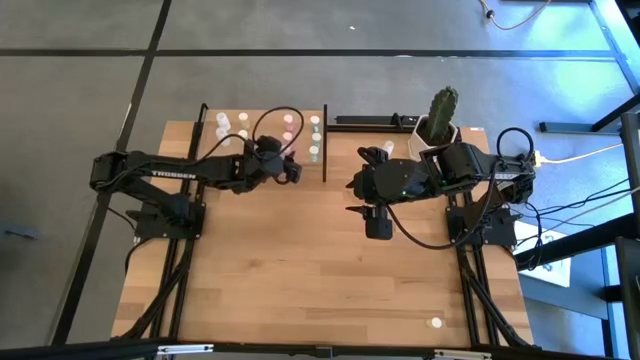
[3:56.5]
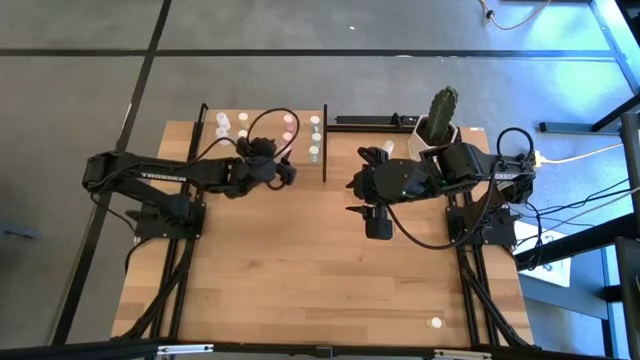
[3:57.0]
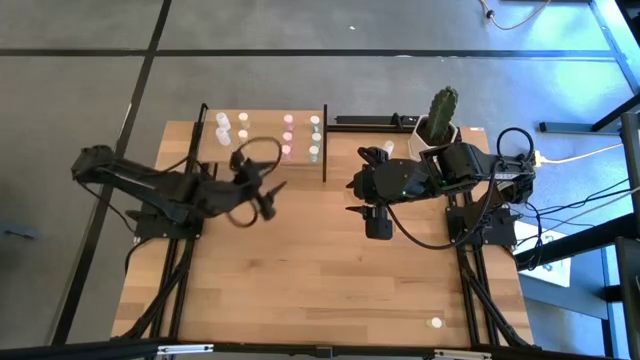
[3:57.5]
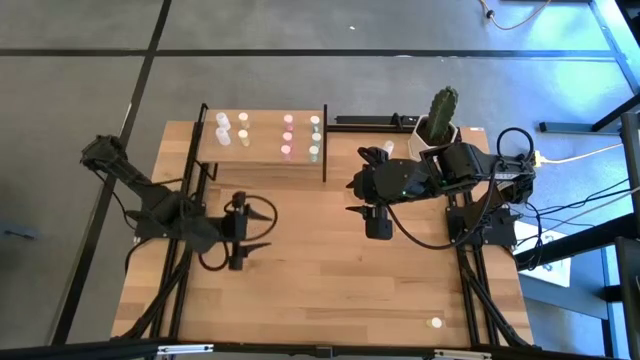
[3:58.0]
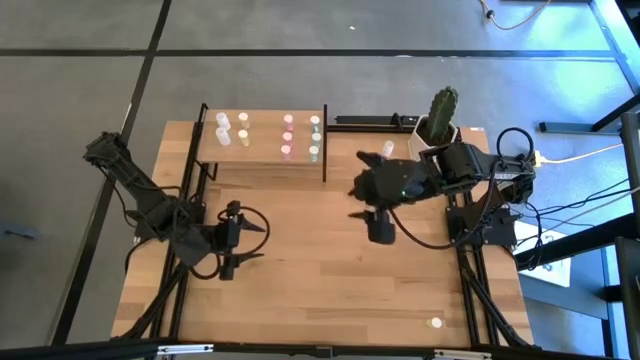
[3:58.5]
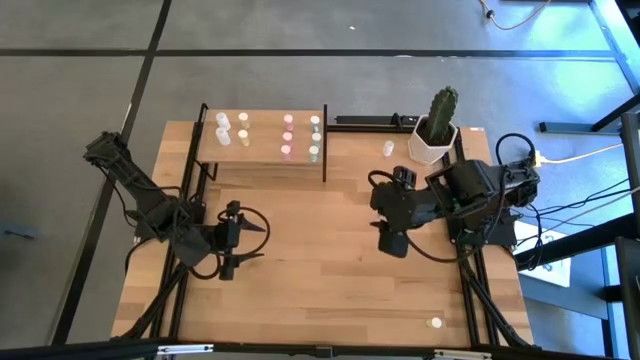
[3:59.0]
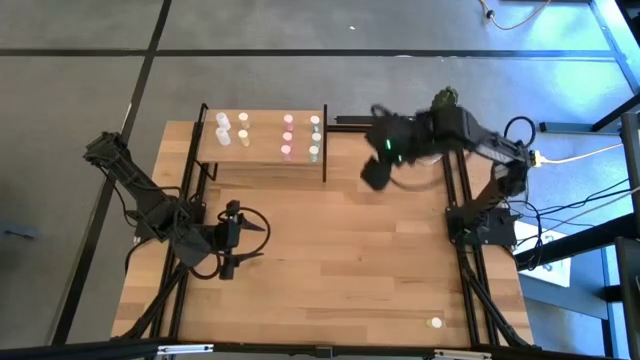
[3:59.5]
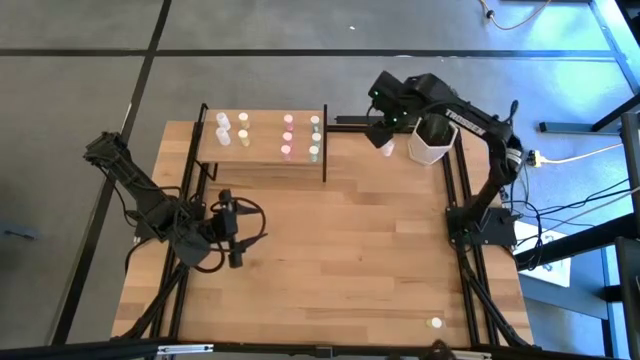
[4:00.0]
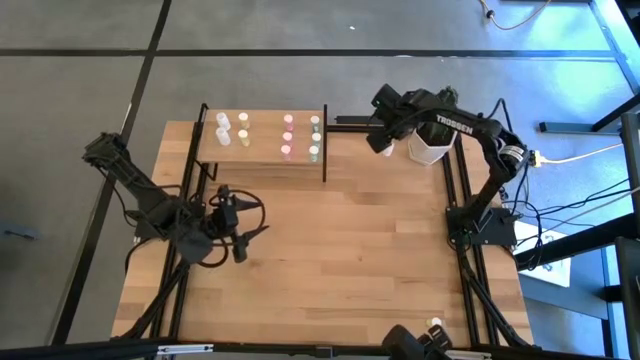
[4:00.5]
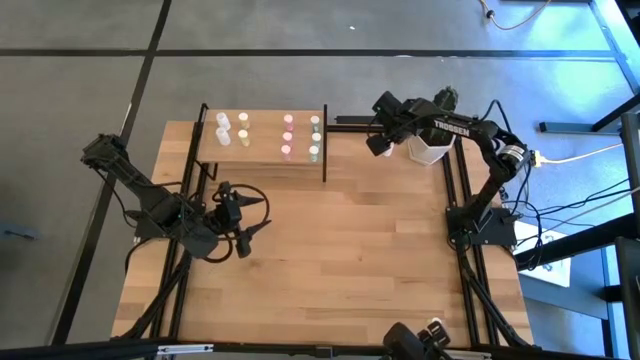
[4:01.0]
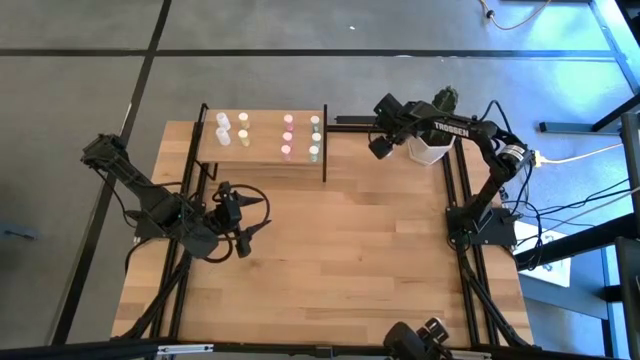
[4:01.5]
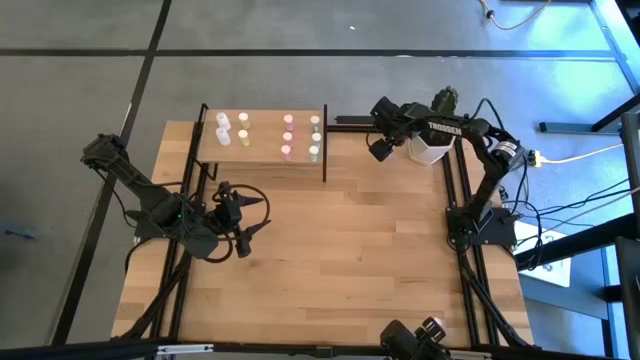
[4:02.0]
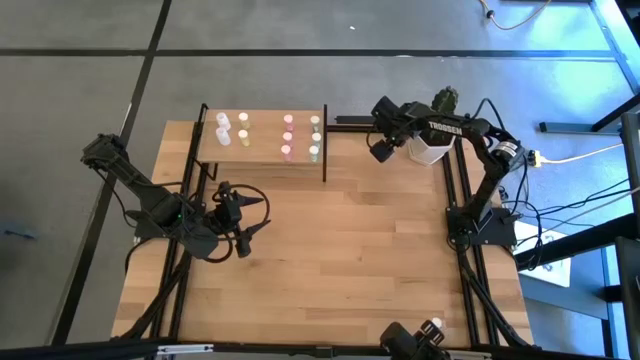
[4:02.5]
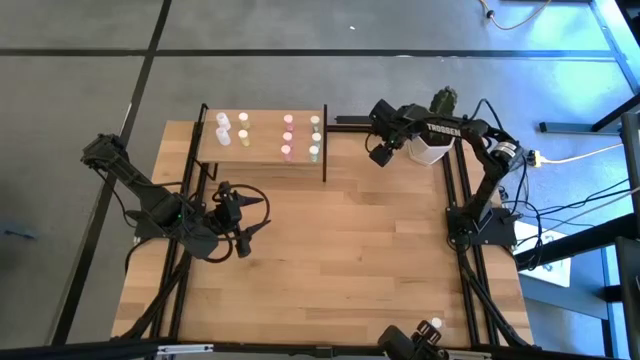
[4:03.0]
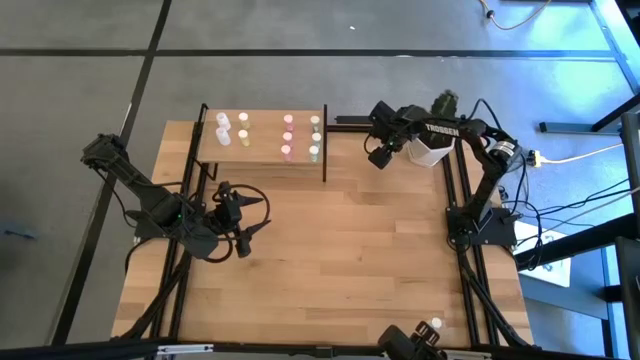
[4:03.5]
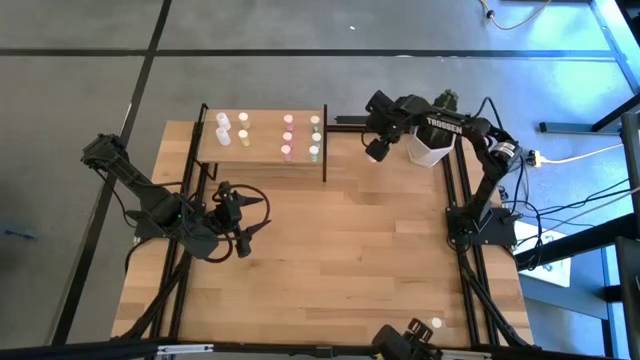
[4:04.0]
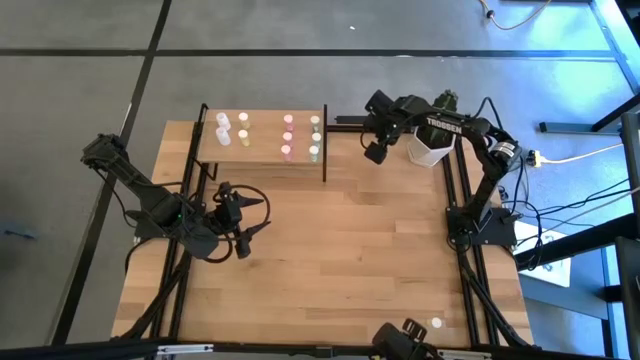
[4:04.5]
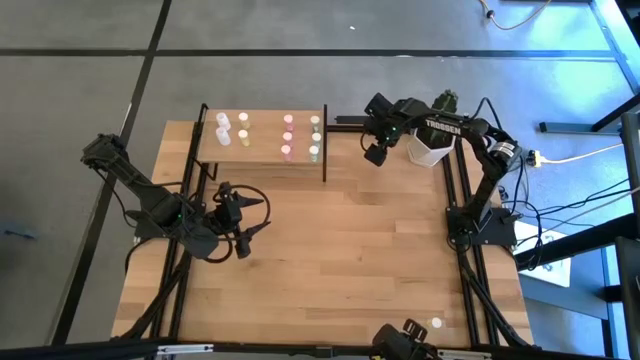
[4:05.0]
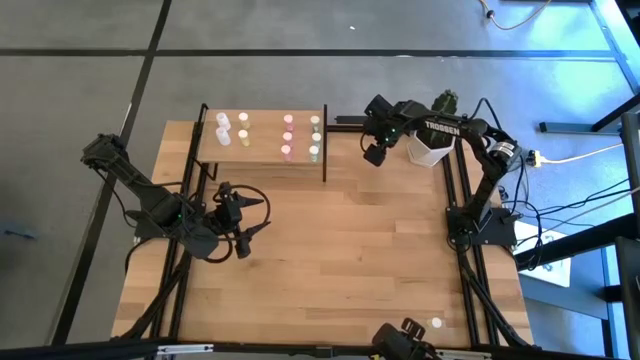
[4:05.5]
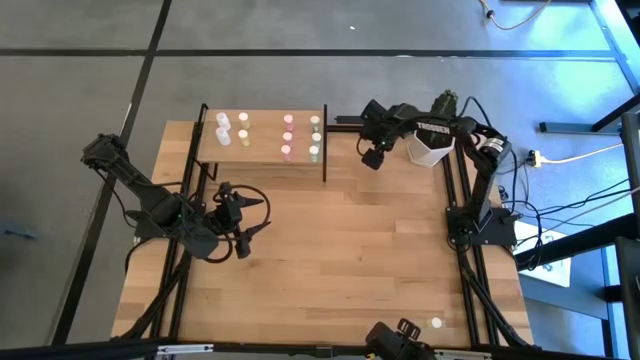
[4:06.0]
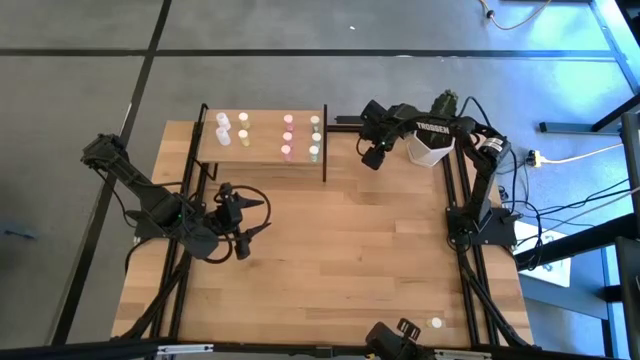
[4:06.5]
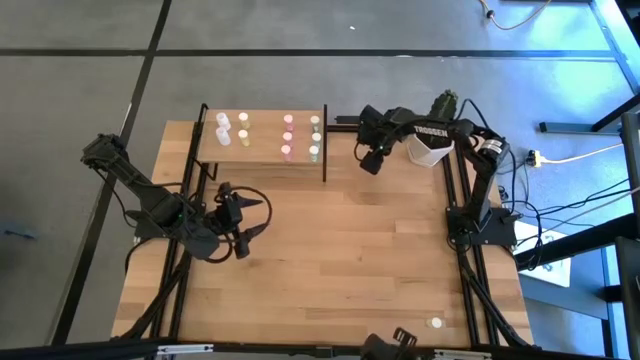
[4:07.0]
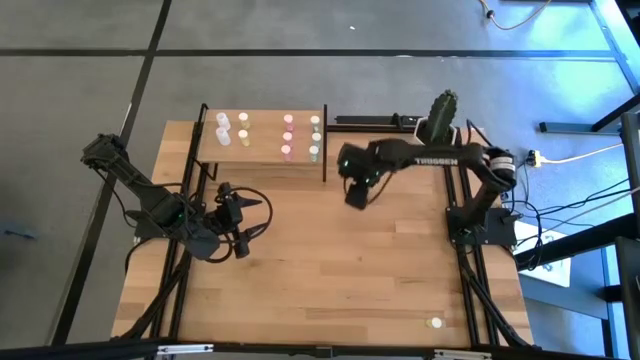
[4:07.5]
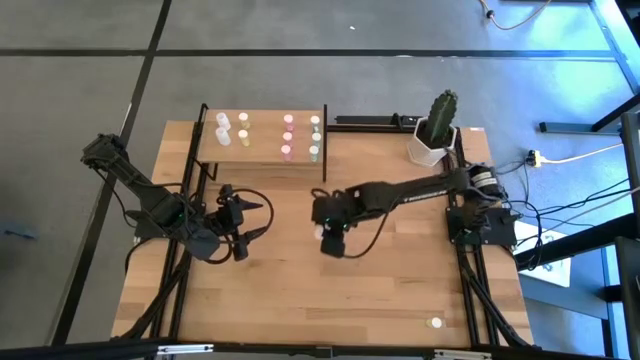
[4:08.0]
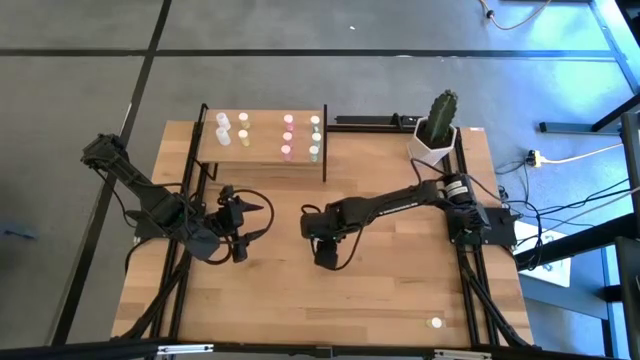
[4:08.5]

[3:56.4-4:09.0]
Task: Pick and place medicine bottles onto shelf by color
Put the white pill bottle on the shelf and align it with the other white pill bottles

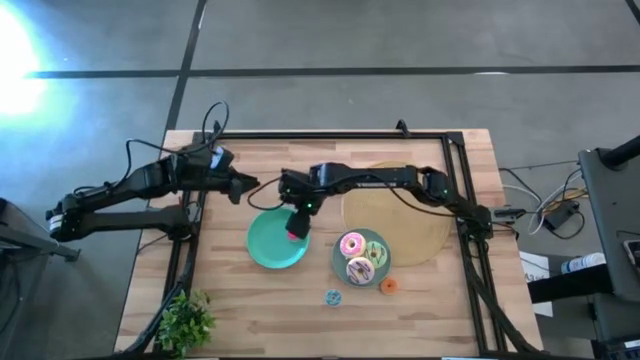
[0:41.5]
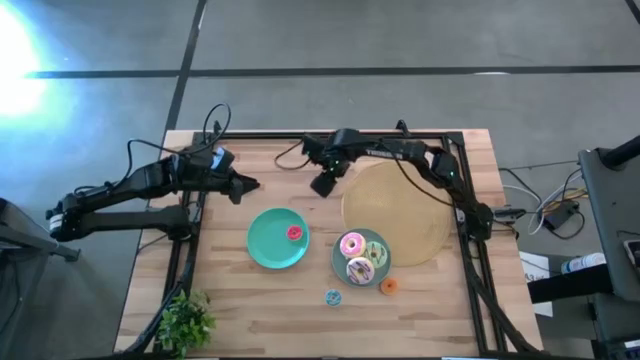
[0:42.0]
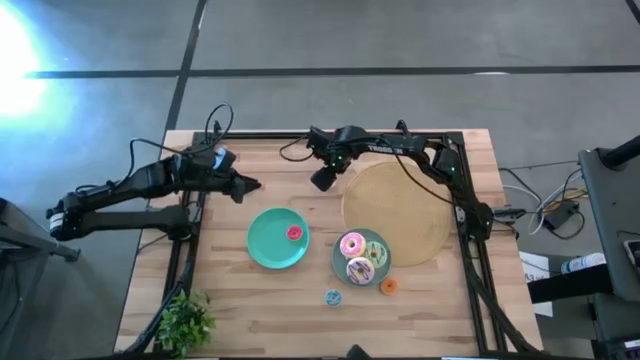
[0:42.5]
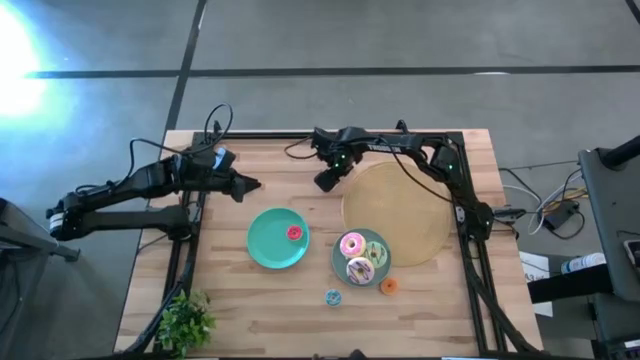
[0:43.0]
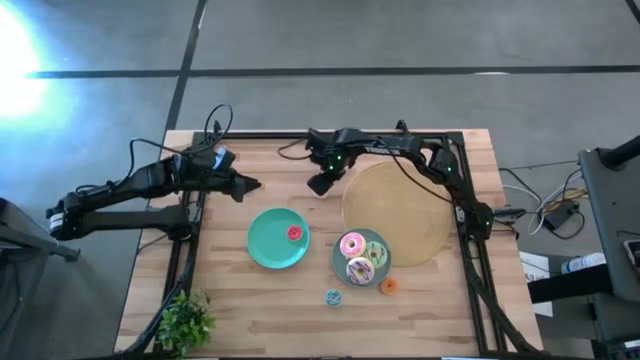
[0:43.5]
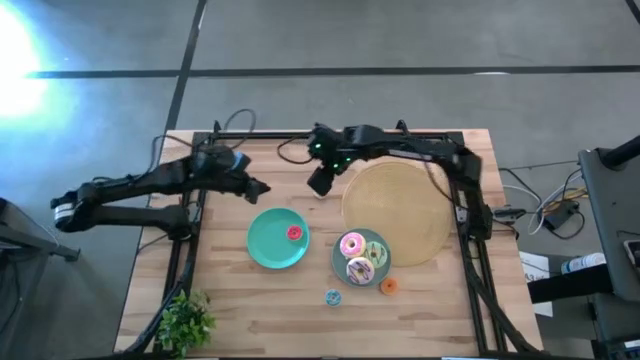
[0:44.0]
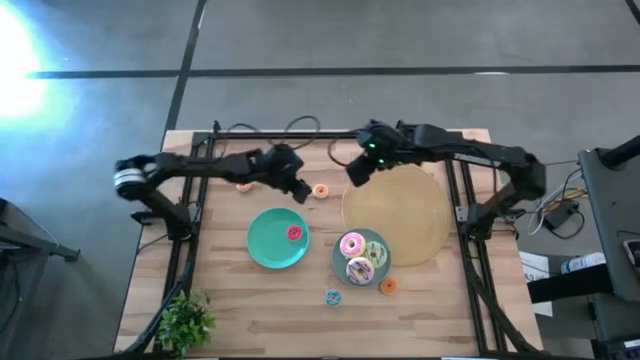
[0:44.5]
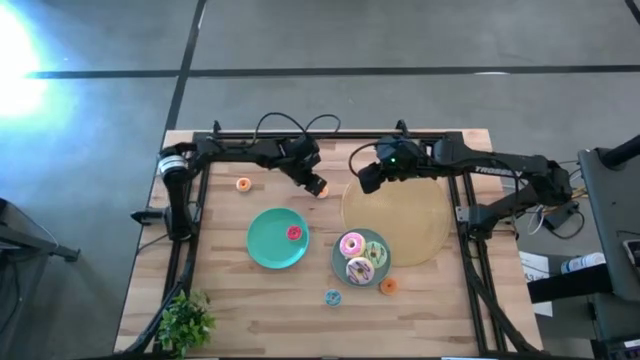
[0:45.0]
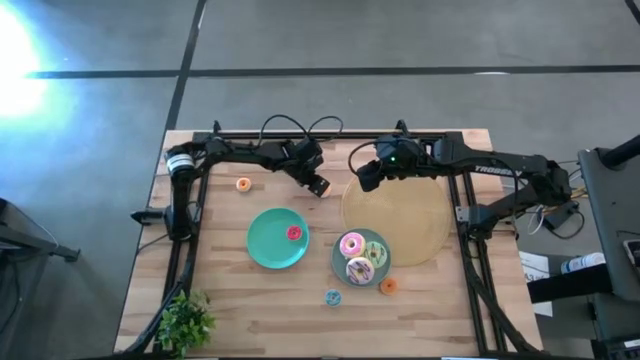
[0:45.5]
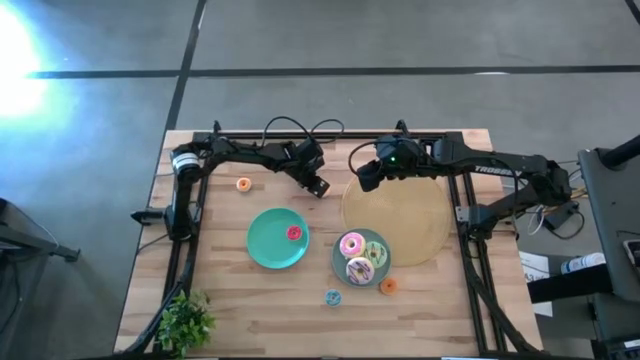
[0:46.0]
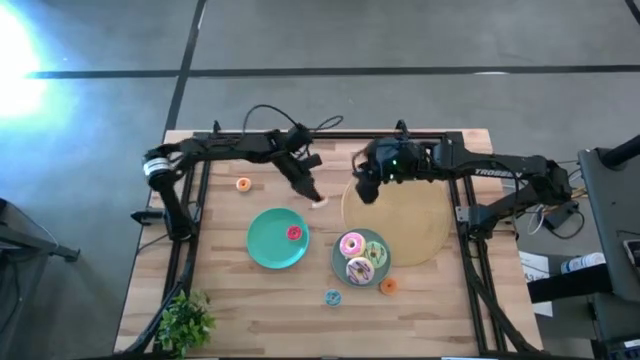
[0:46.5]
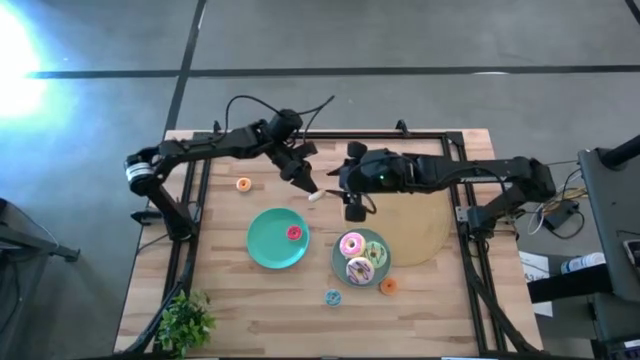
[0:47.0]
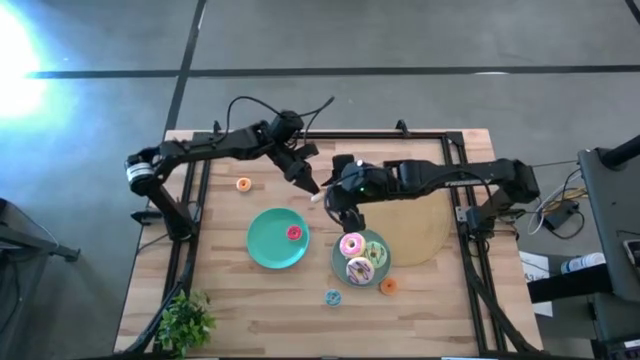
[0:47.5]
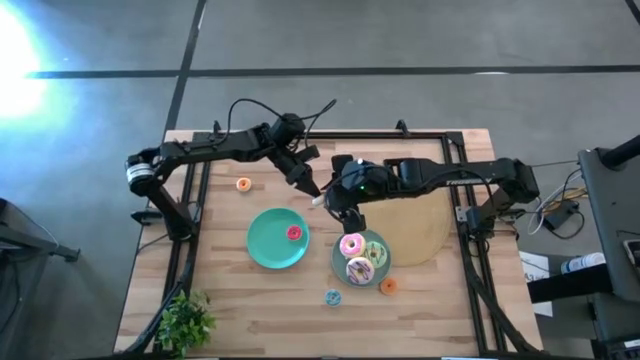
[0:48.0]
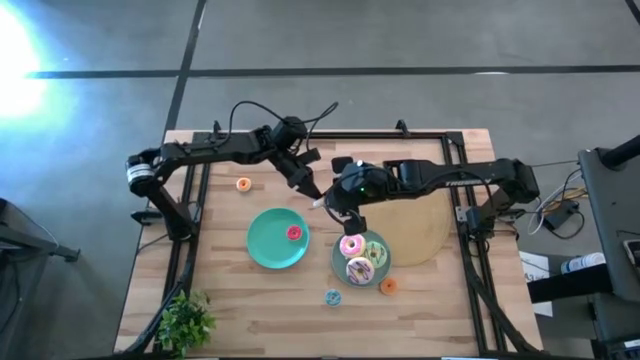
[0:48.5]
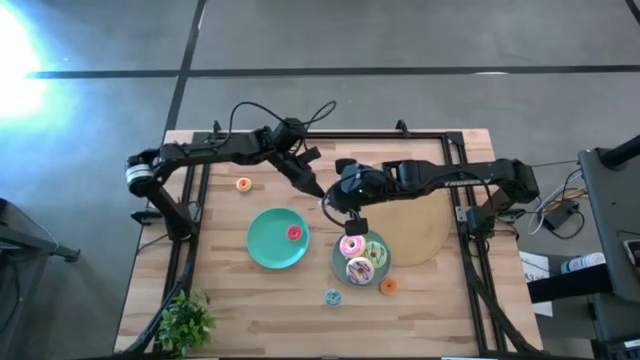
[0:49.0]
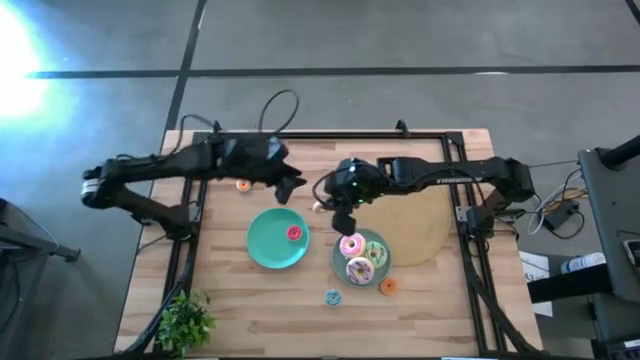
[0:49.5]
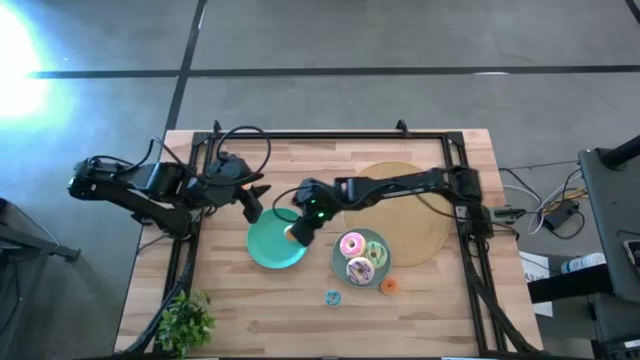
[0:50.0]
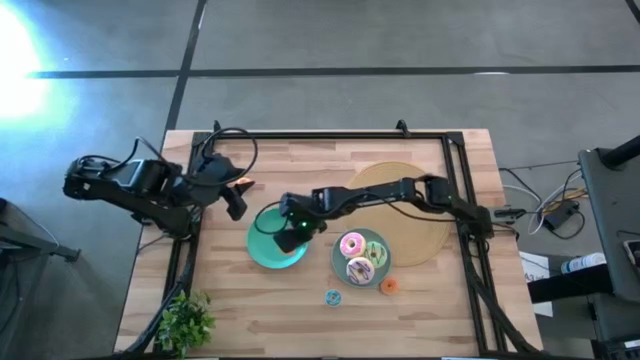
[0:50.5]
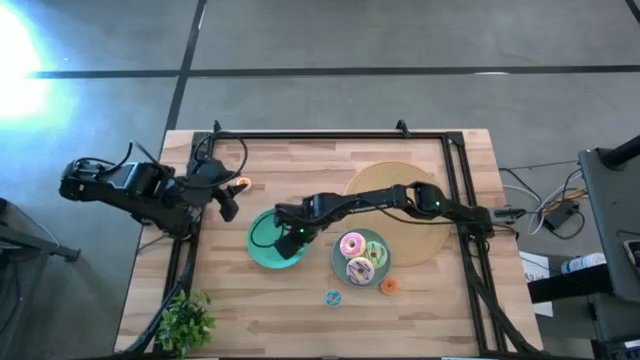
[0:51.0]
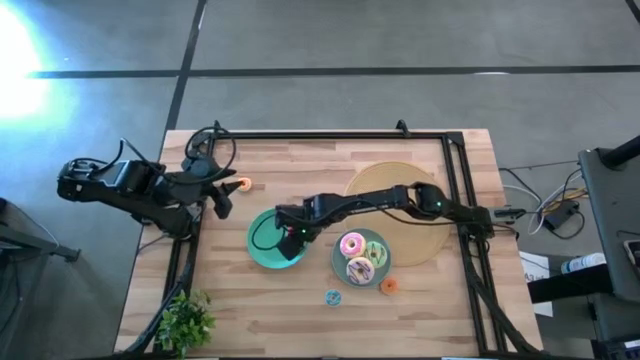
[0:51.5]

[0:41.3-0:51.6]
Task: Pick & Place donuts
Put the small yellow donut on the green plate
